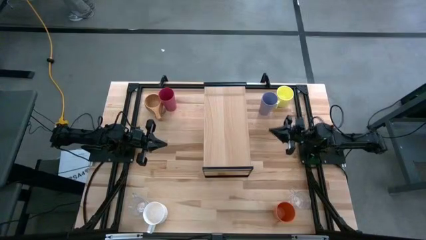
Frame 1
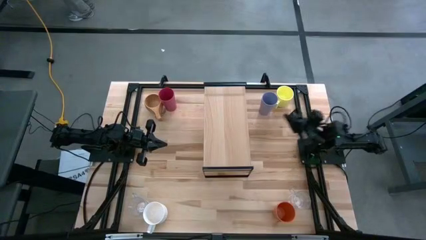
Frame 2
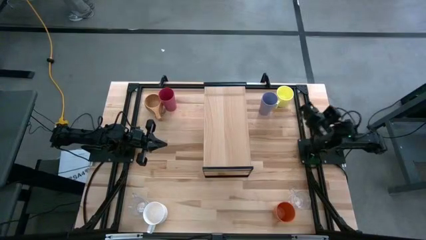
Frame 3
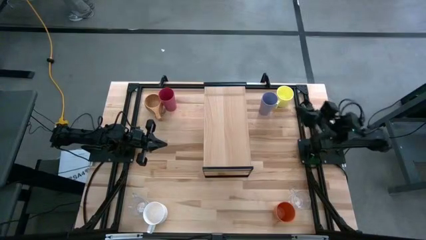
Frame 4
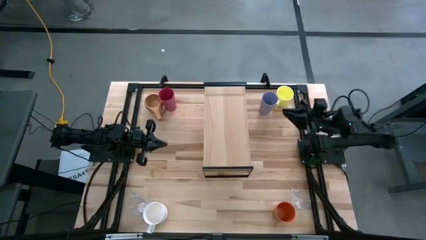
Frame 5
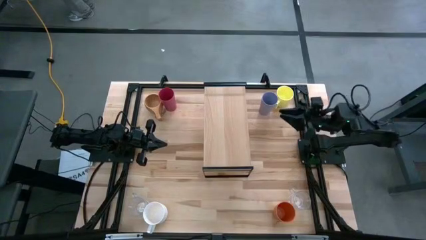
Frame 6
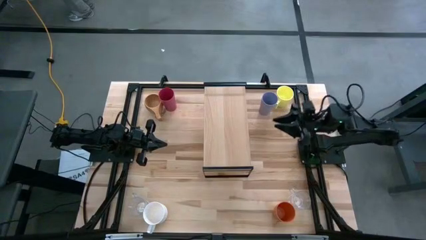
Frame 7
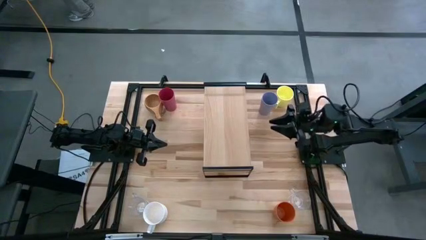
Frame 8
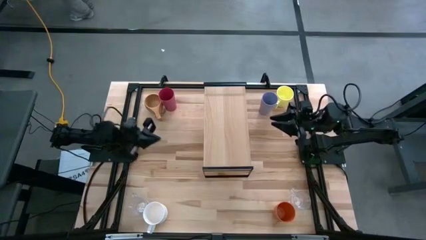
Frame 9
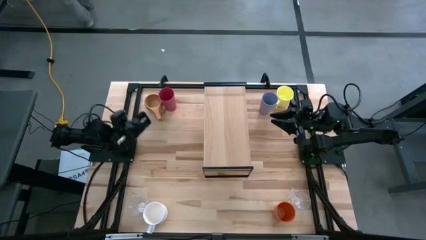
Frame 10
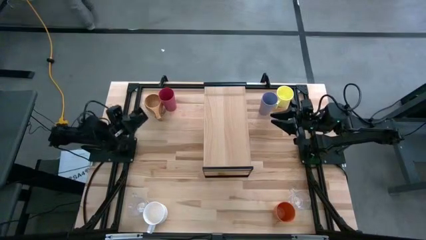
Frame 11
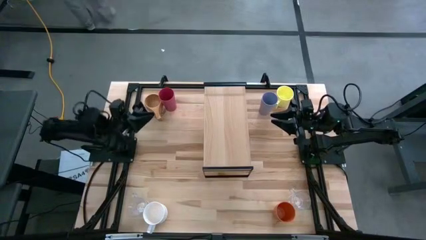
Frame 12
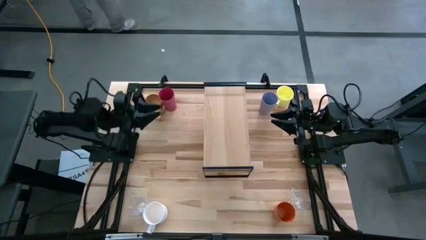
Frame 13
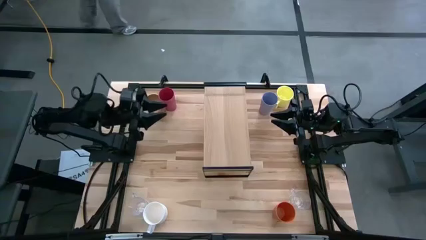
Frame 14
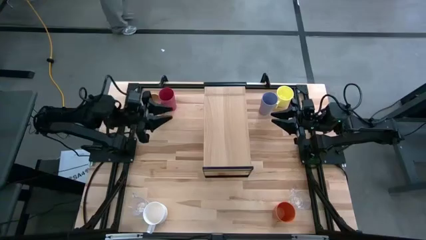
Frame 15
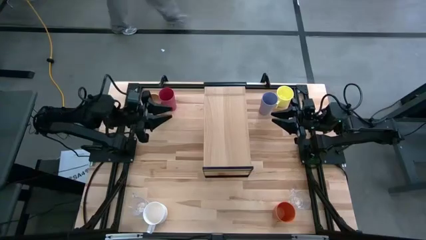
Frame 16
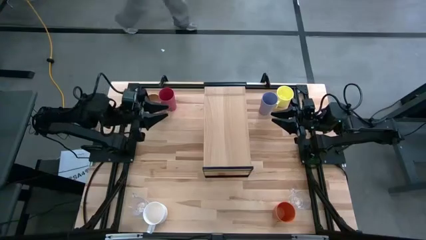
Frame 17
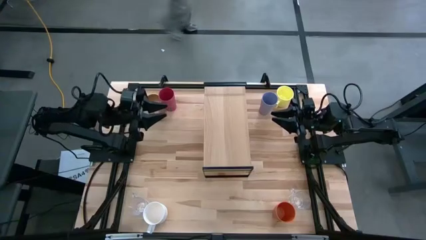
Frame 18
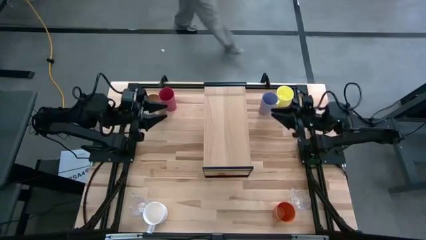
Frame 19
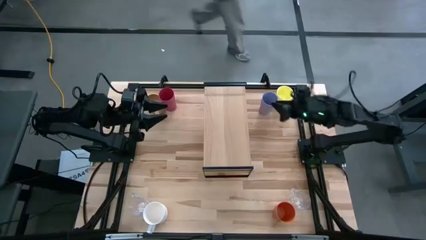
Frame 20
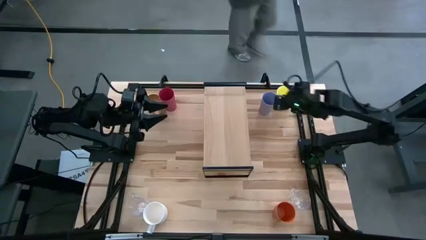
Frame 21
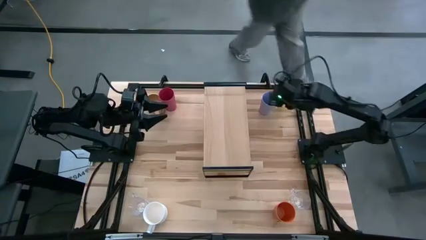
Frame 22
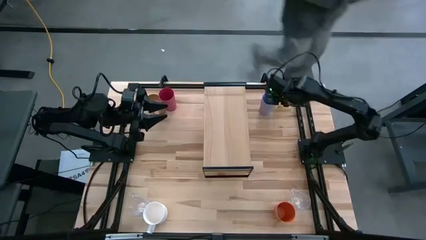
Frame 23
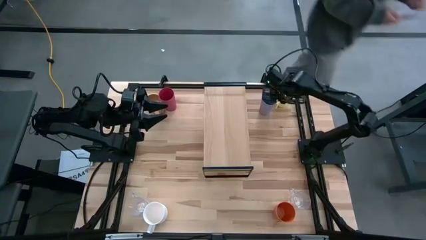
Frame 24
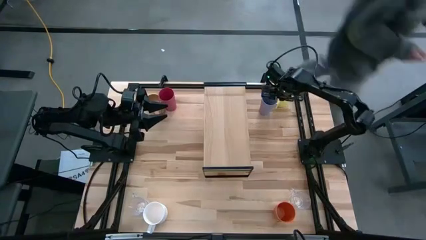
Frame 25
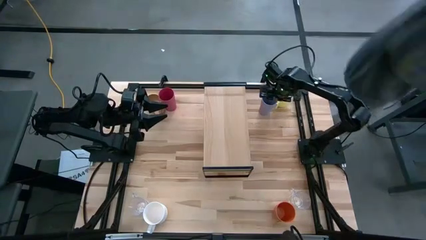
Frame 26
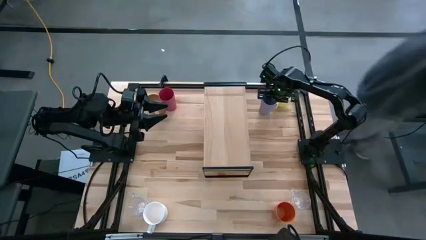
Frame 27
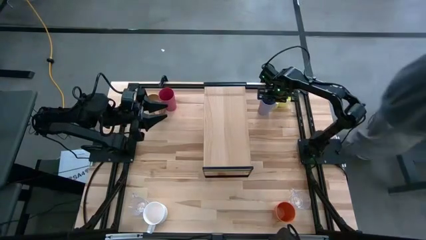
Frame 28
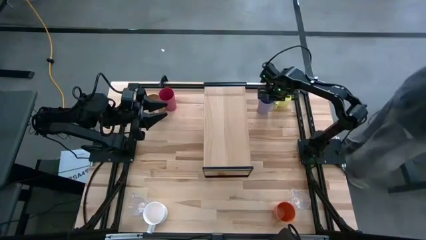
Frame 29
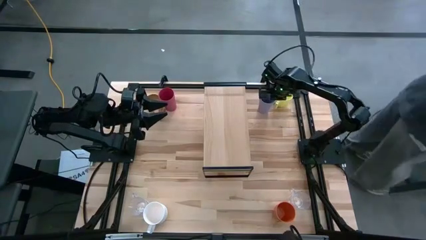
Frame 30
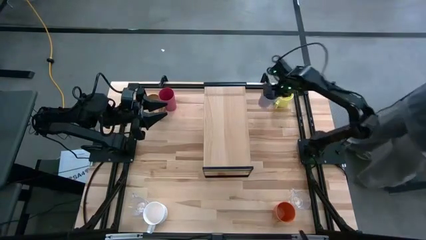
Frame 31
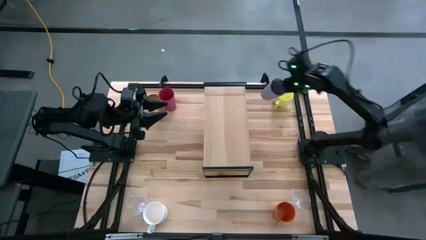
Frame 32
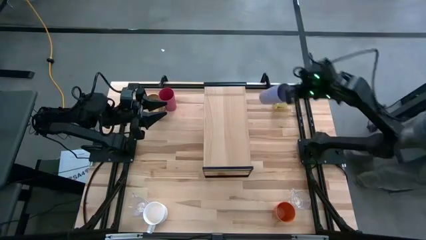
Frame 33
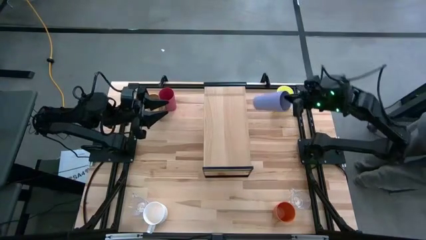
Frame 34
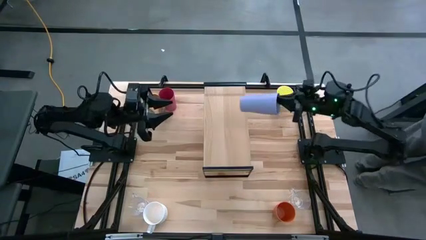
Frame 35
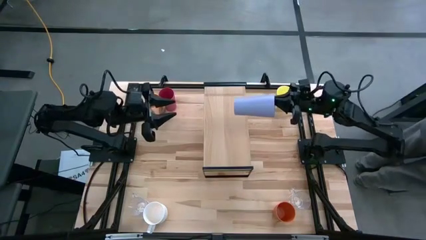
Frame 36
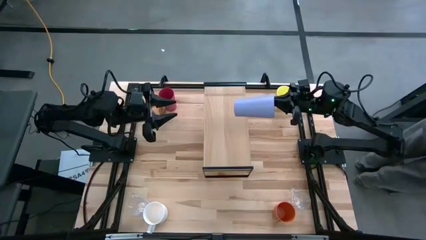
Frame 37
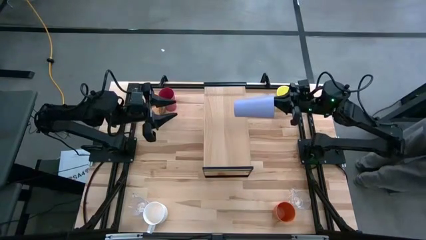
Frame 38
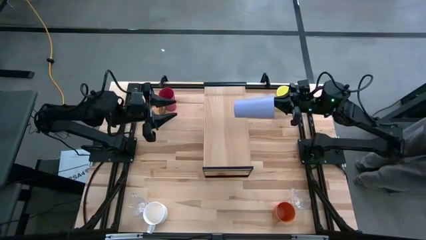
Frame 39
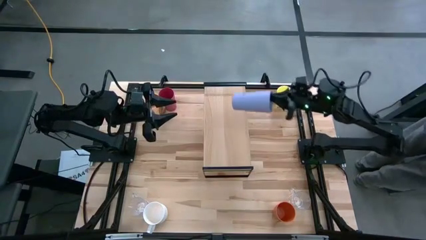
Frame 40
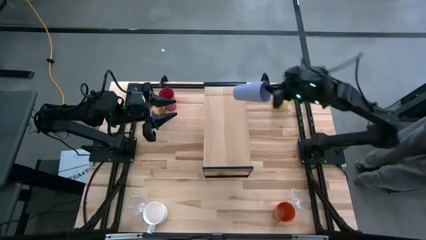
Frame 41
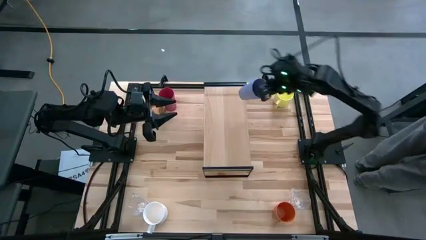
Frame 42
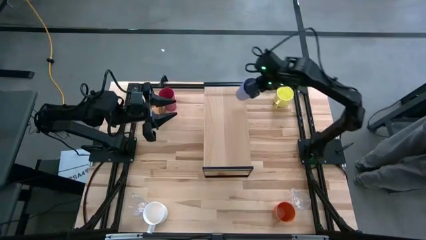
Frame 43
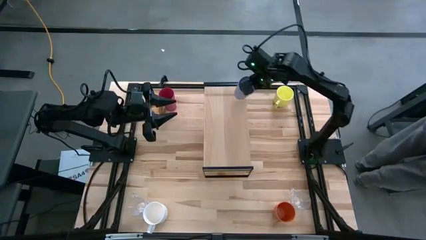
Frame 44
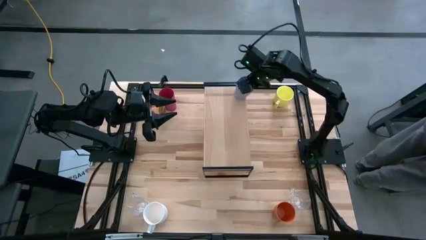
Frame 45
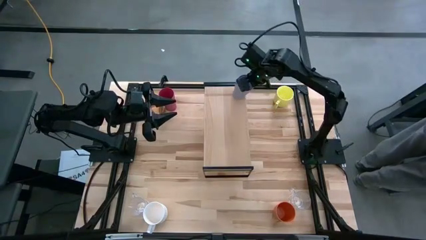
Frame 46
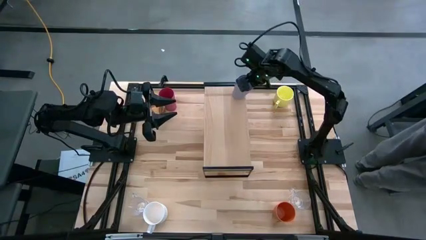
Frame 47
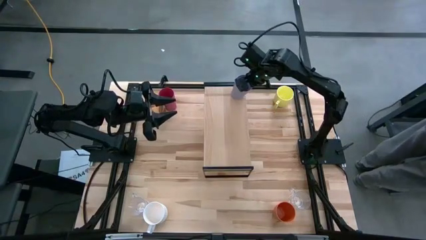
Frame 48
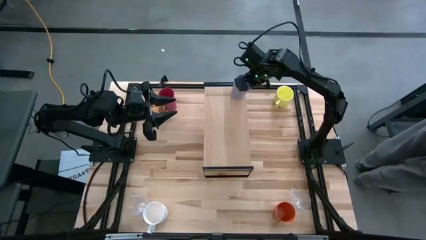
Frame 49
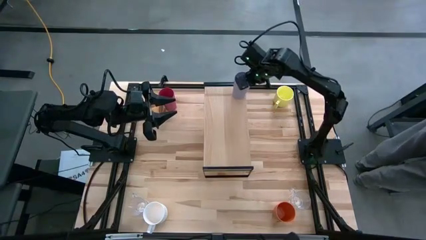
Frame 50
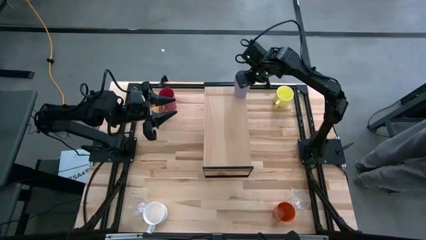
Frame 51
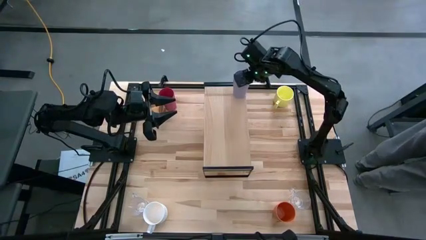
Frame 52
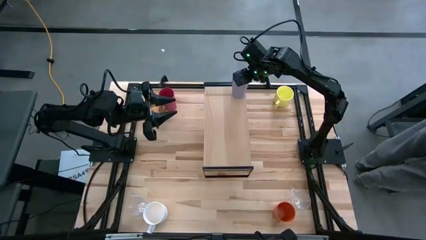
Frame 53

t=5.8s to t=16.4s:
Task: Stack small to large cups/mugs on shelf
Put the violet cup on the shelf
